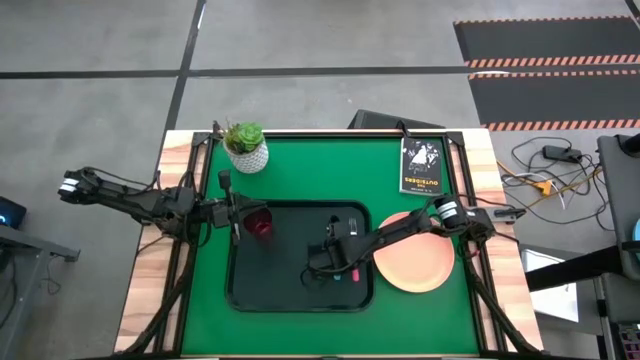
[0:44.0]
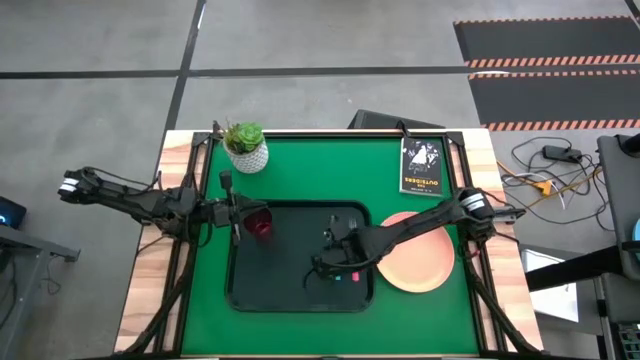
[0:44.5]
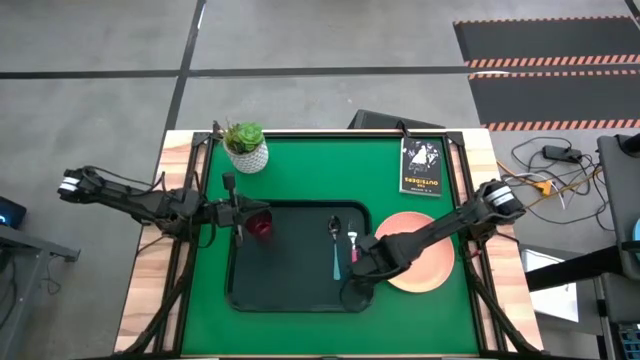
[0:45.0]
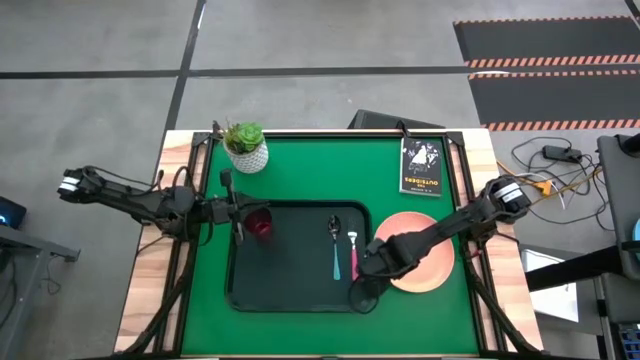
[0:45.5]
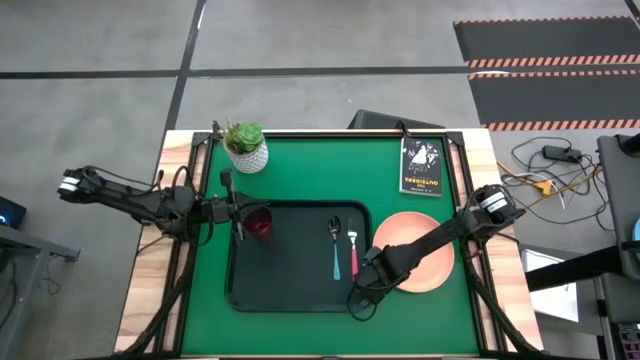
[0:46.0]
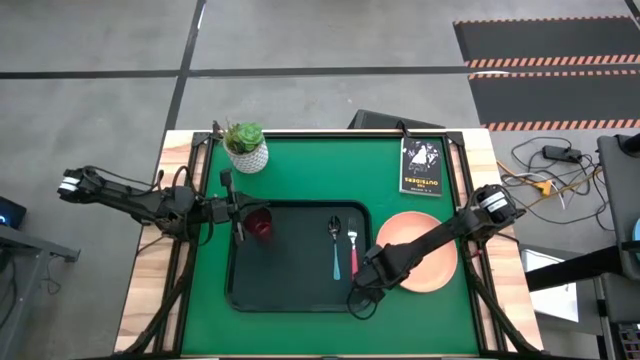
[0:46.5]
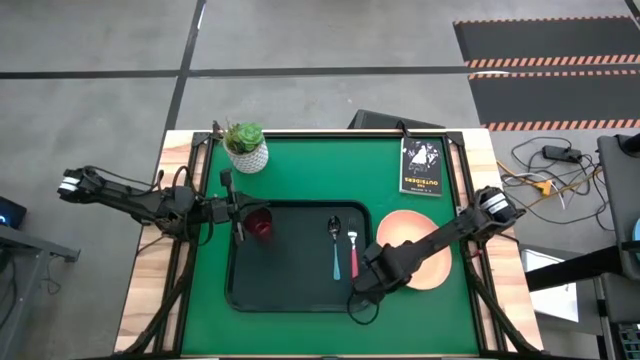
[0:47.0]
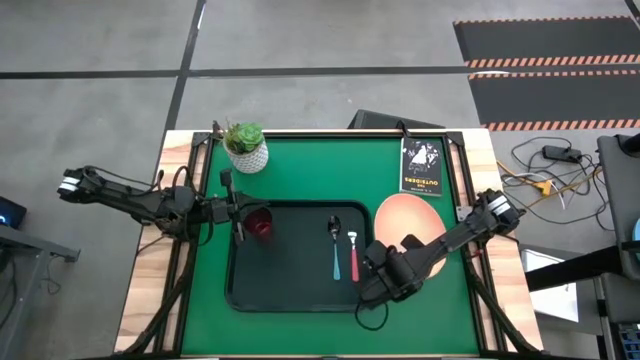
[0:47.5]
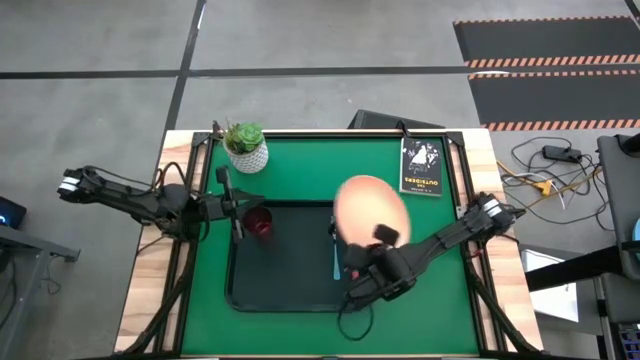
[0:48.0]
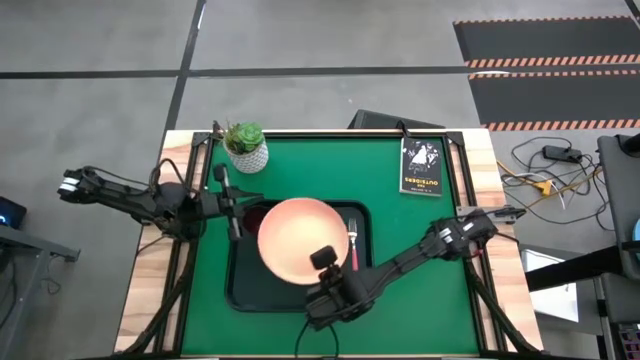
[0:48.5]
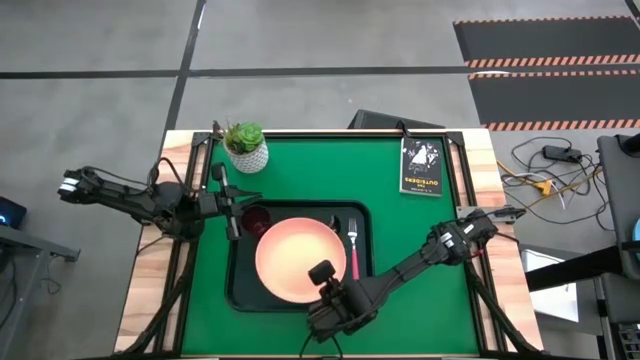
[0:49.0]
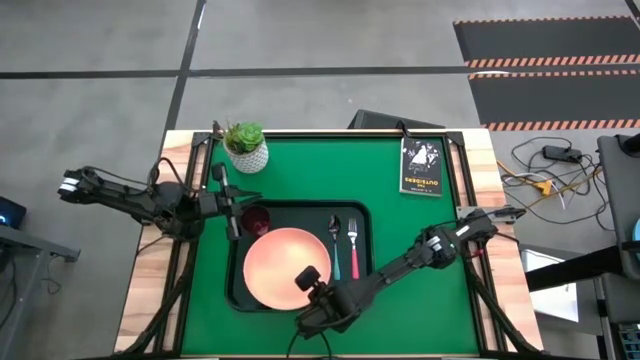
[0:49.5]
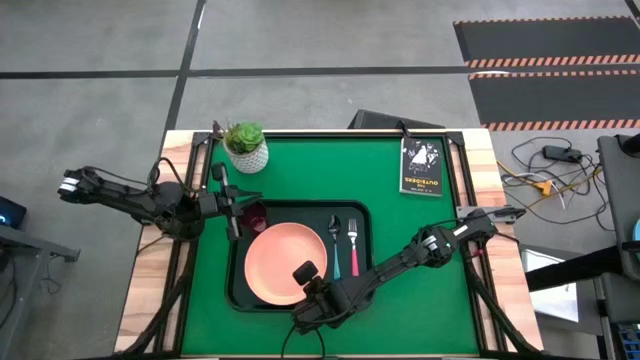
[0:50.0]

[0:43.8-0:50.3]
Task: Pick and place plate/cup/fork/spoon on tray
Put the orange plate on the black tray to the bottom right of the red cup

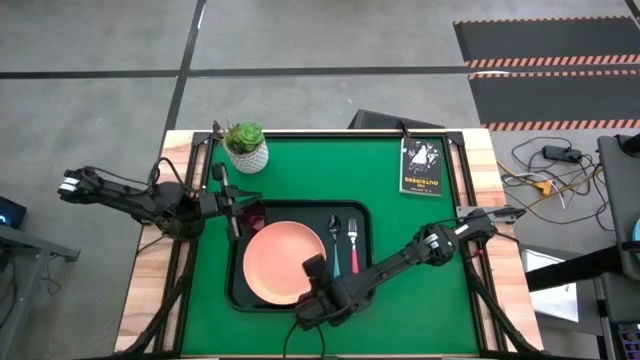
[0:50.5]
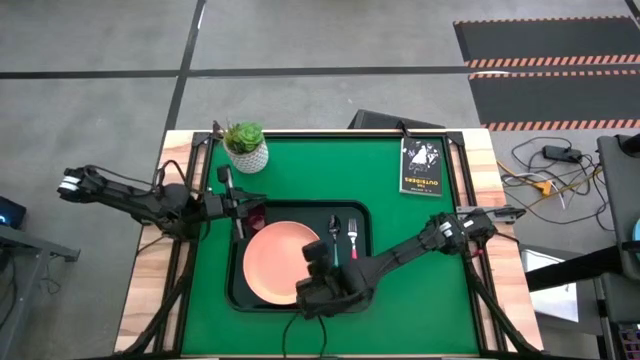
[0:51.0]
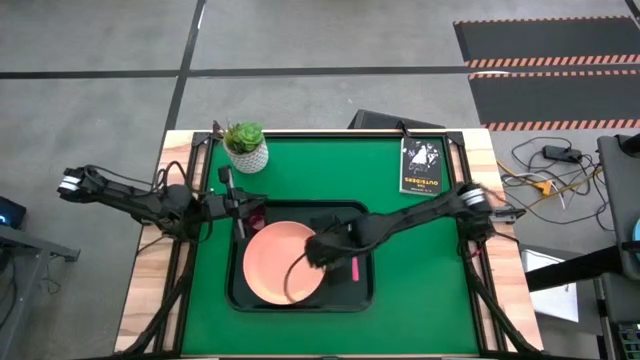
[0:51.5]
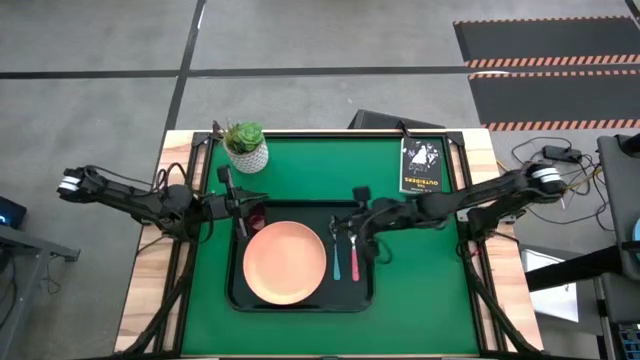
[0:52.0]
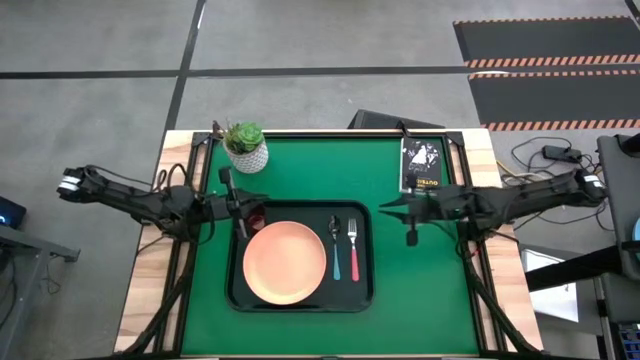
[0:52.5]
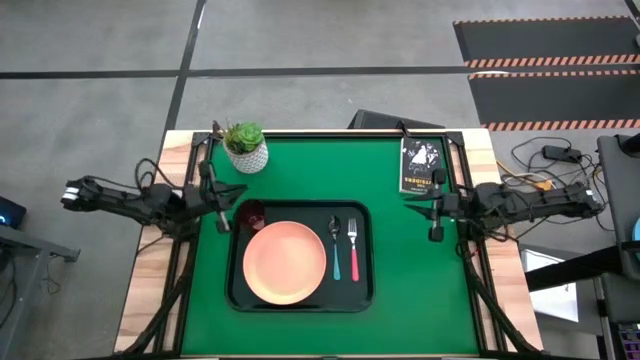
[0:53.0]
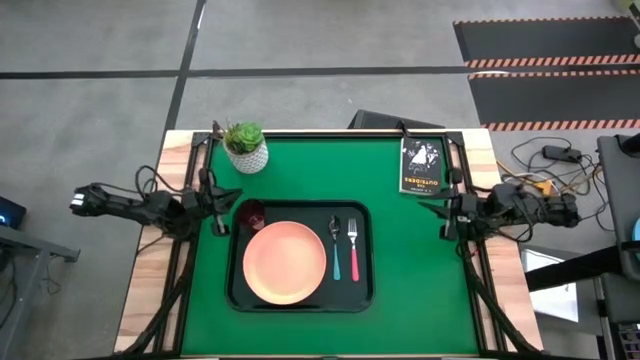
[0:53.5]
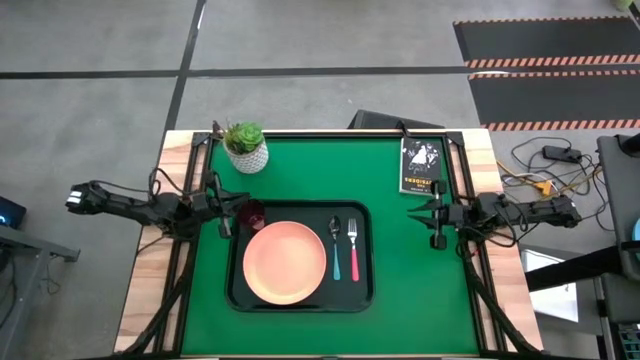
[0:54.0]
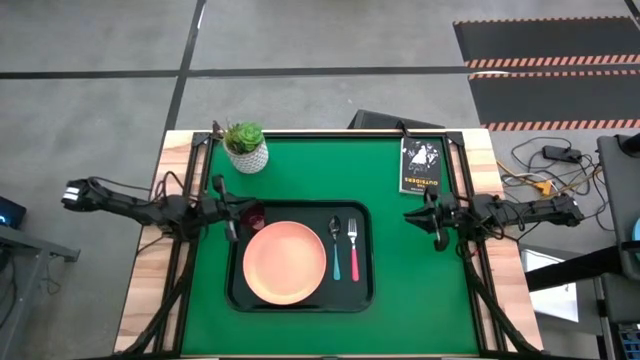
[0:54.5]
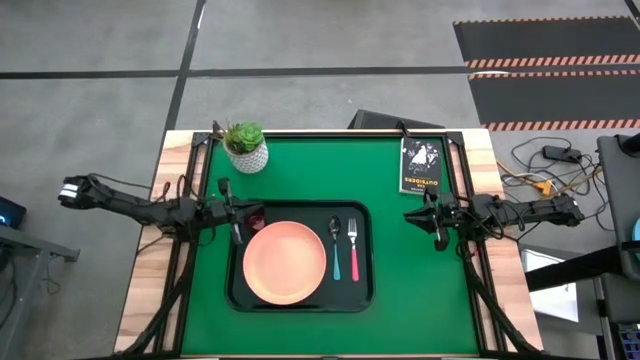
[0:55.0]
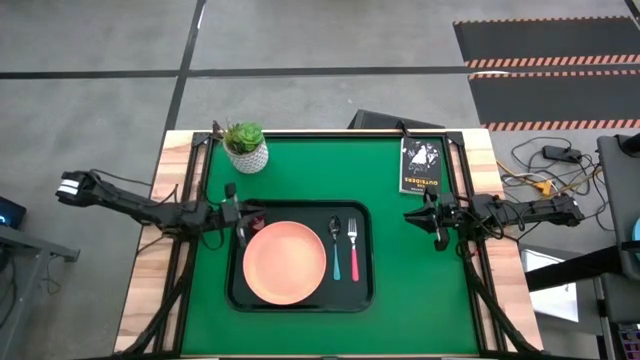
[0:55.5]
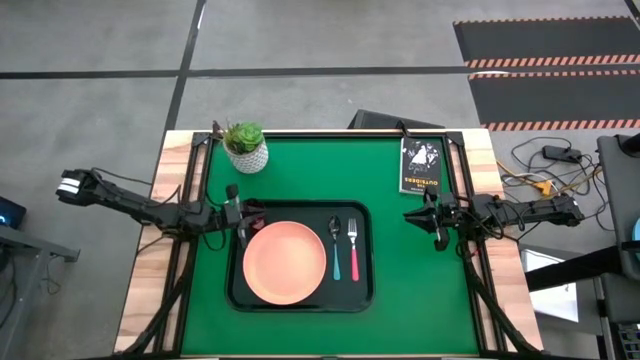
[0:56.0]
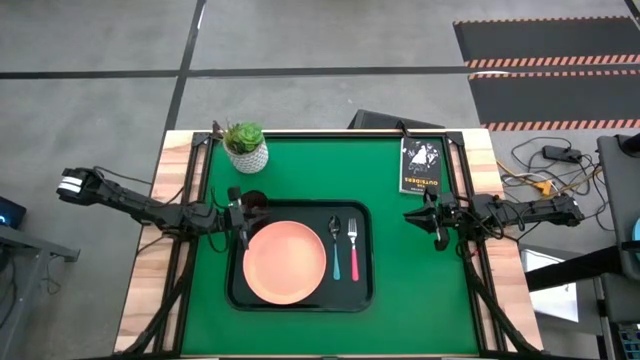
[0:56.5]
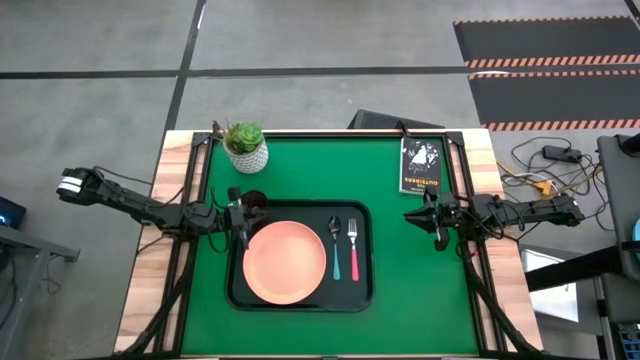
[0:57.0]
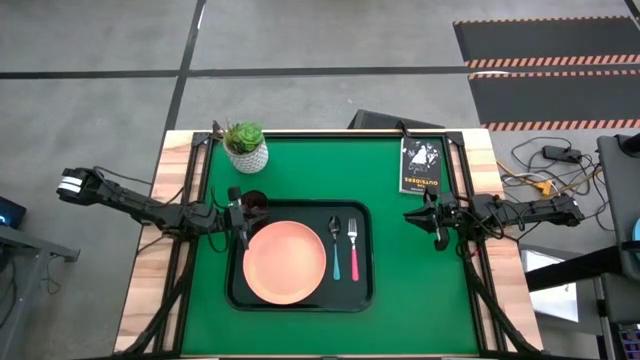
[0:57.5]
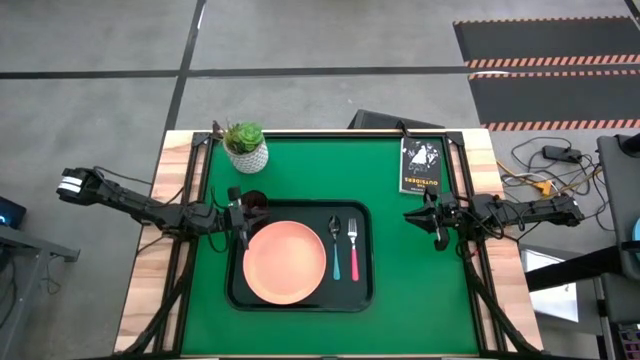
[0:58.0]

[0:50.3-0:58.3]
Return to Home Position
